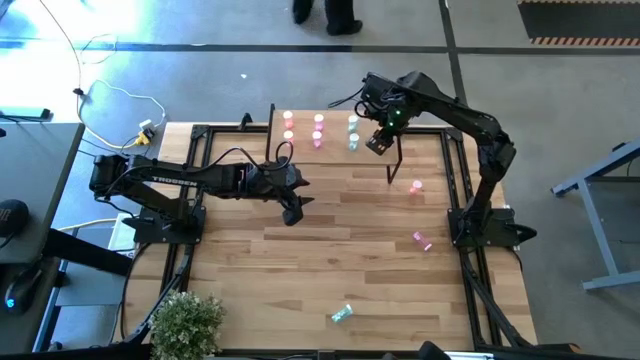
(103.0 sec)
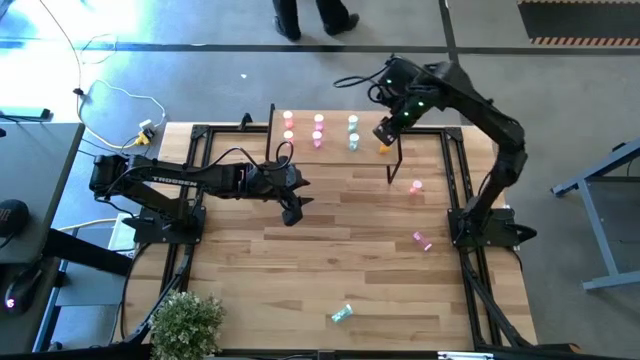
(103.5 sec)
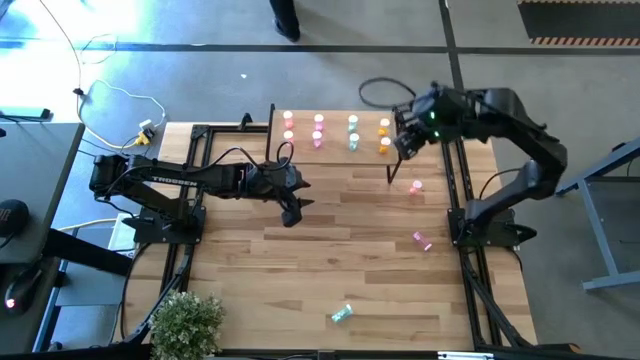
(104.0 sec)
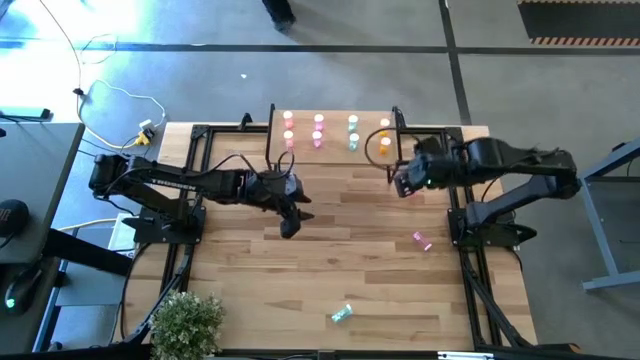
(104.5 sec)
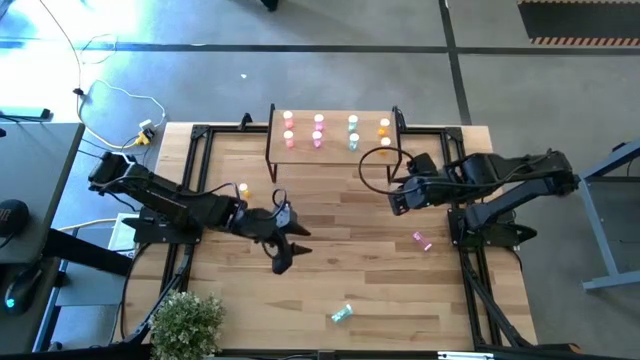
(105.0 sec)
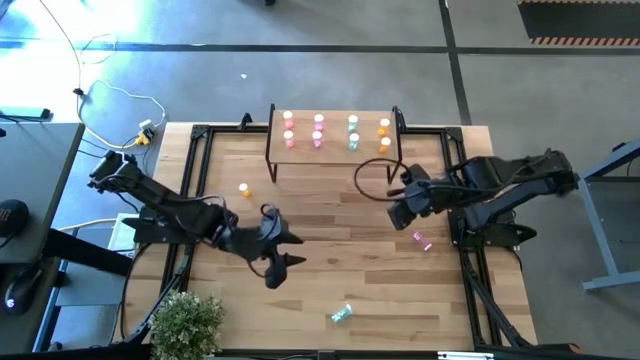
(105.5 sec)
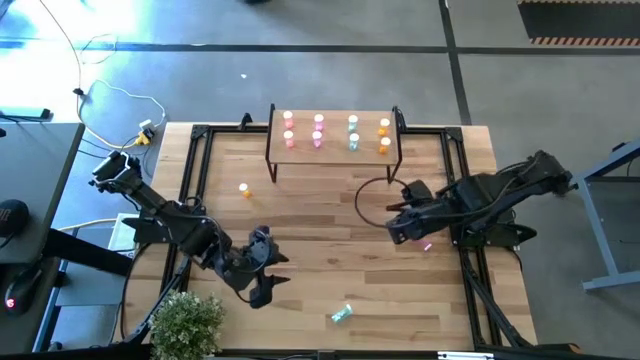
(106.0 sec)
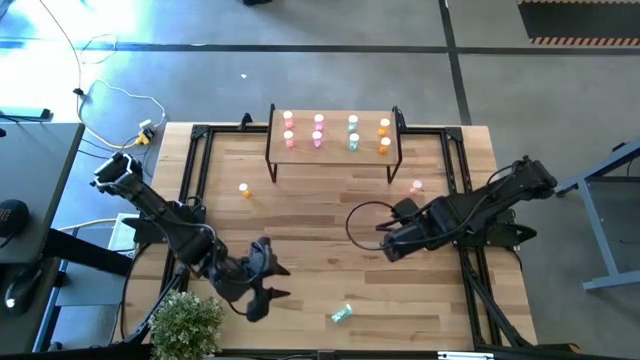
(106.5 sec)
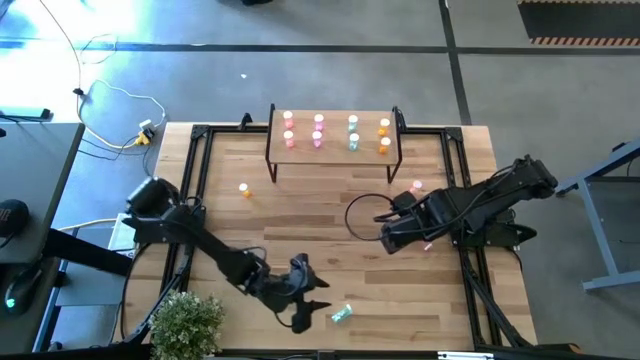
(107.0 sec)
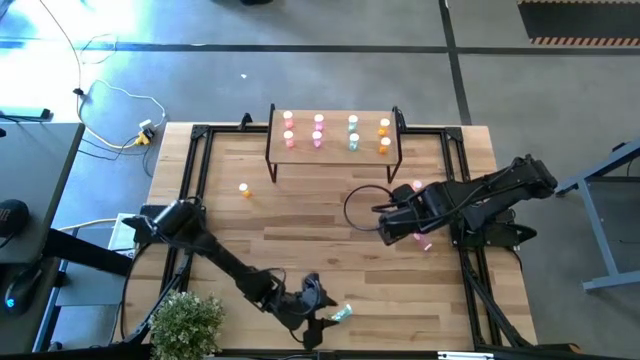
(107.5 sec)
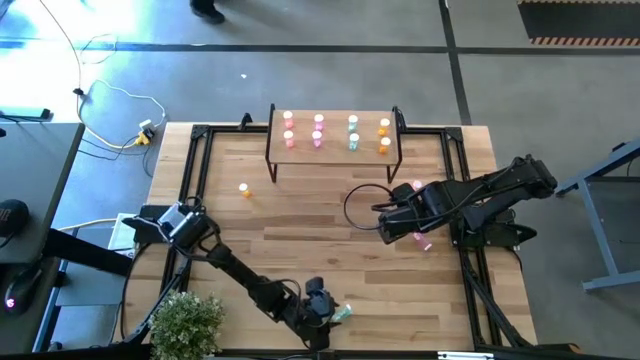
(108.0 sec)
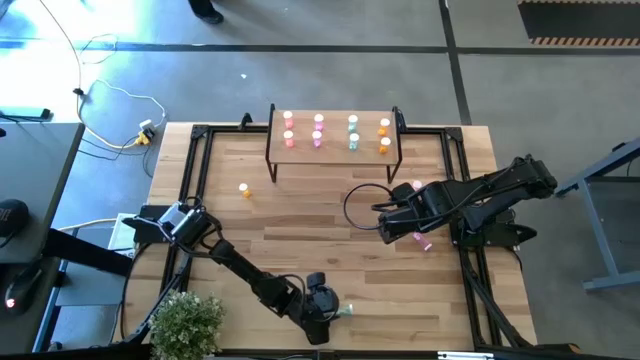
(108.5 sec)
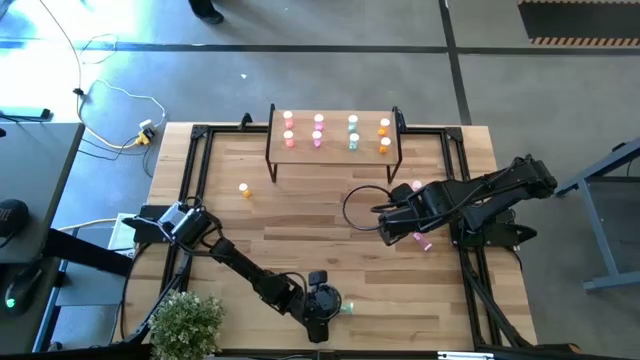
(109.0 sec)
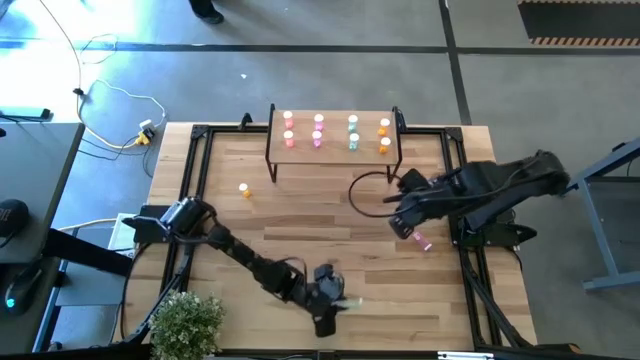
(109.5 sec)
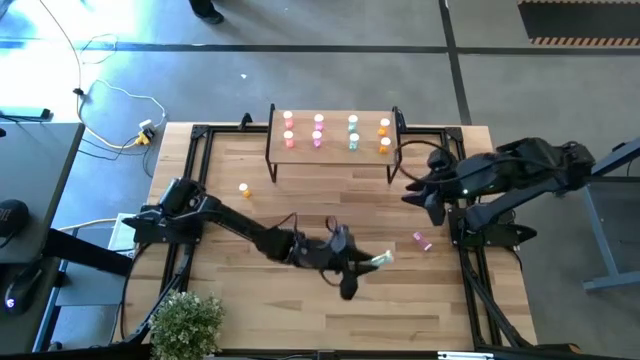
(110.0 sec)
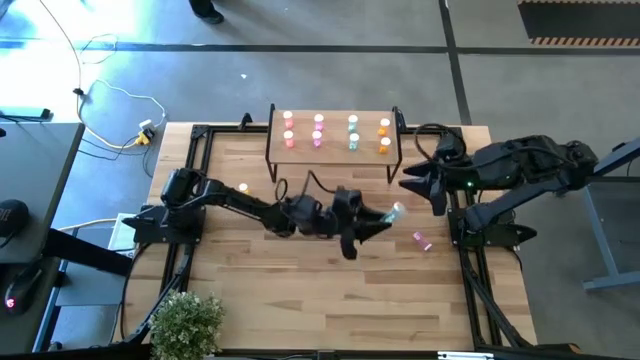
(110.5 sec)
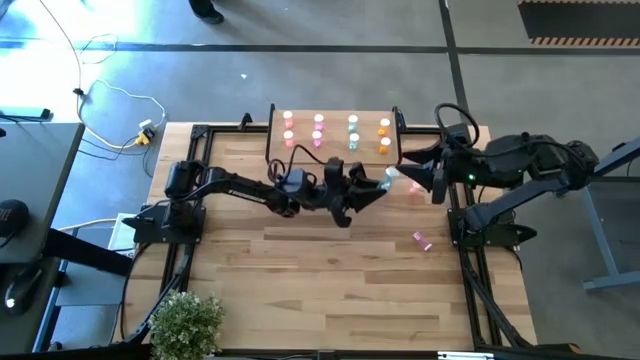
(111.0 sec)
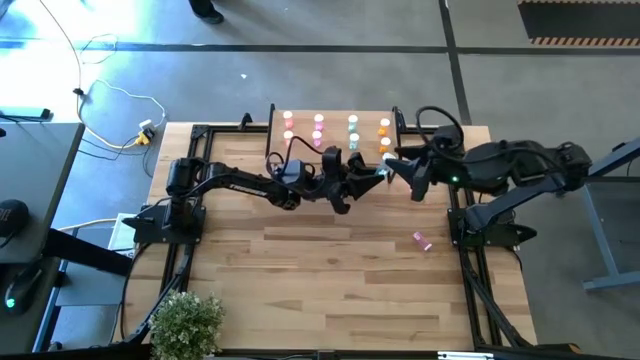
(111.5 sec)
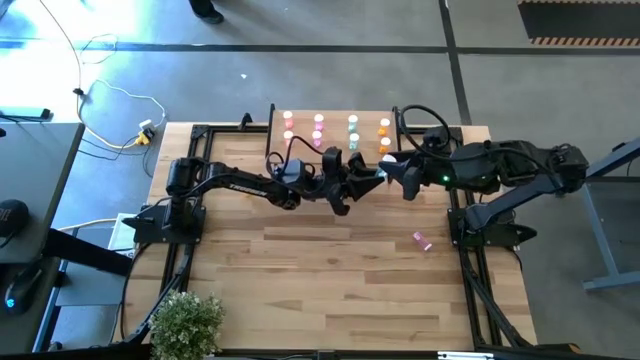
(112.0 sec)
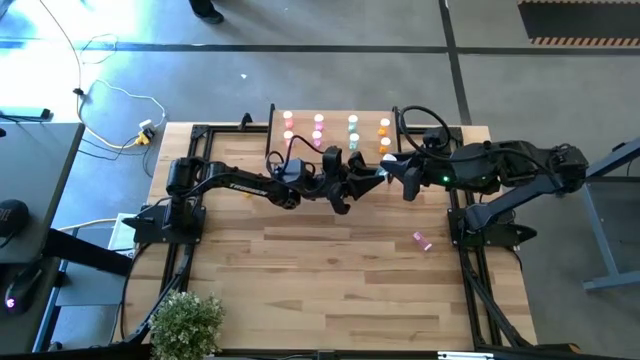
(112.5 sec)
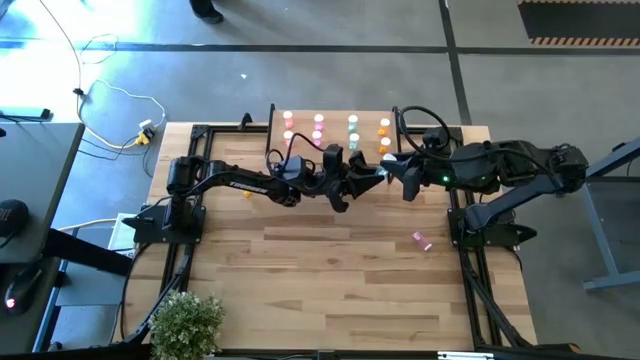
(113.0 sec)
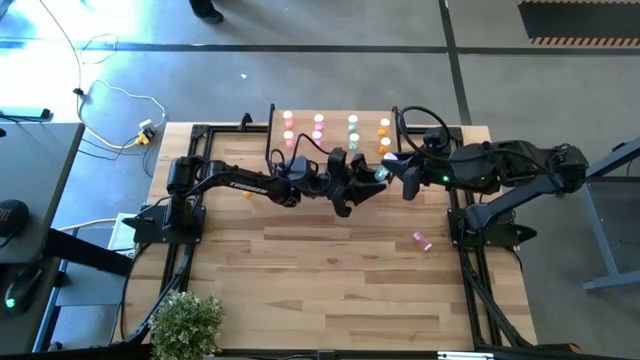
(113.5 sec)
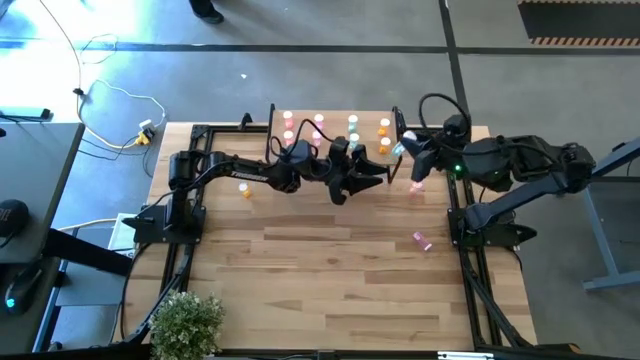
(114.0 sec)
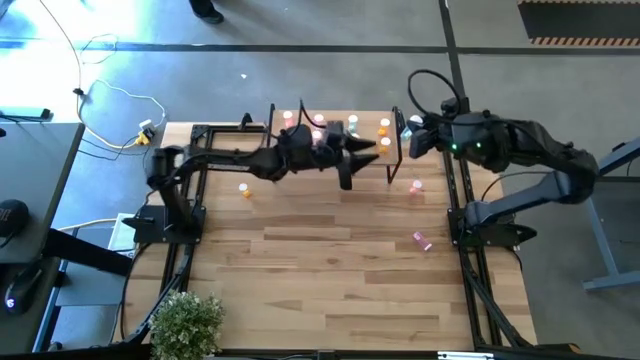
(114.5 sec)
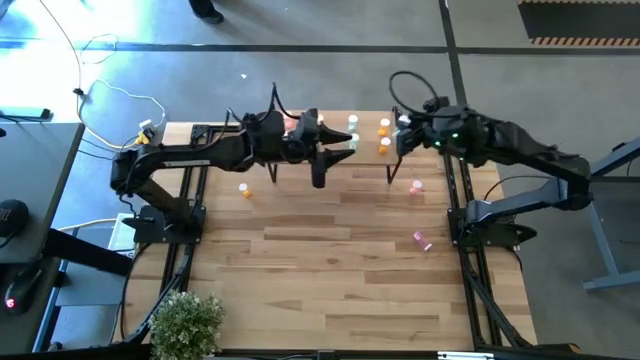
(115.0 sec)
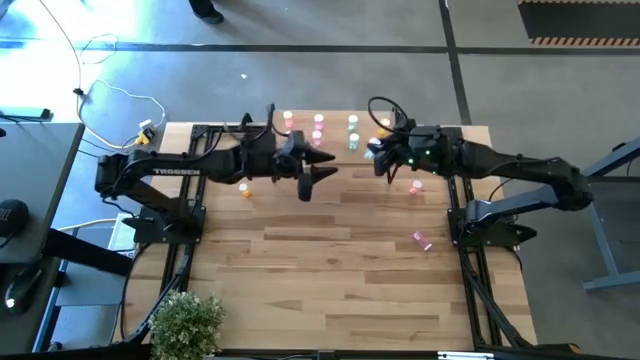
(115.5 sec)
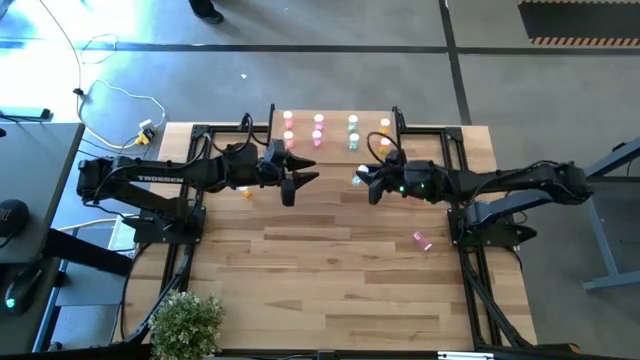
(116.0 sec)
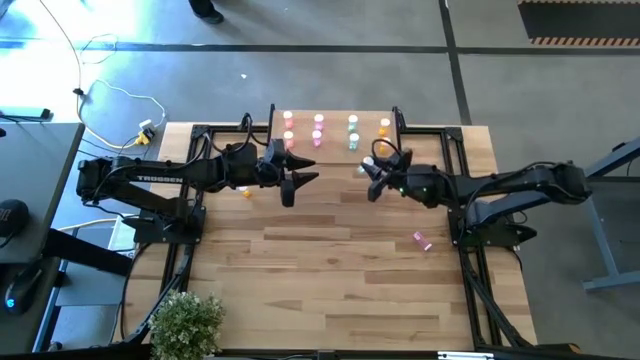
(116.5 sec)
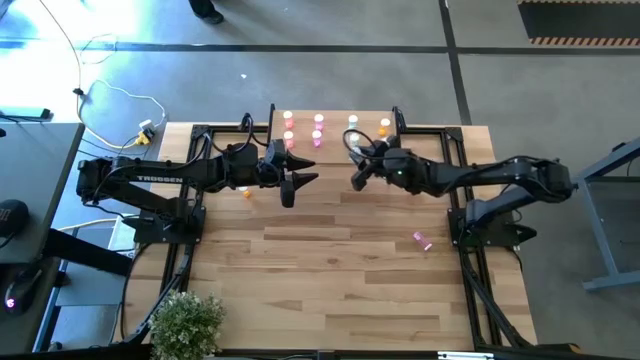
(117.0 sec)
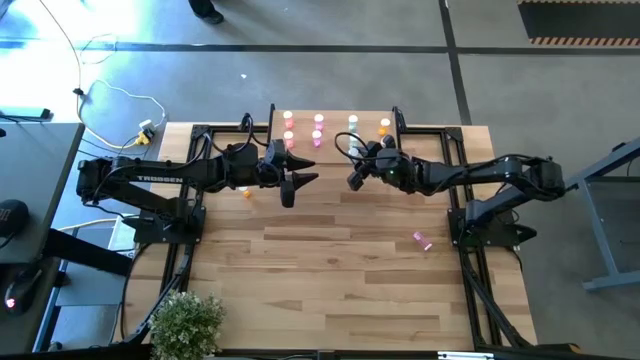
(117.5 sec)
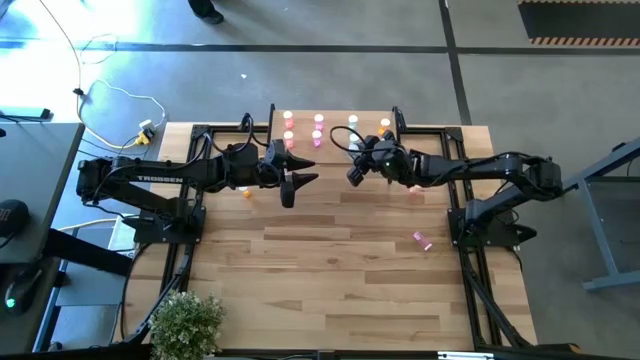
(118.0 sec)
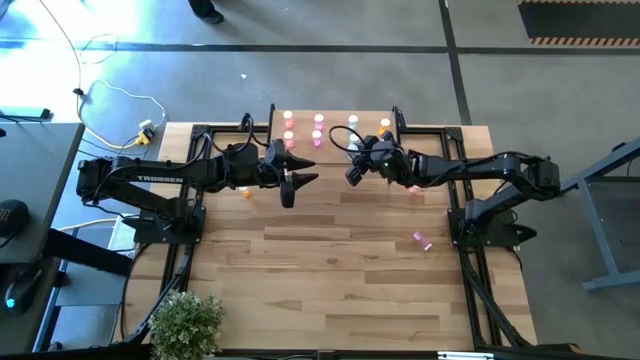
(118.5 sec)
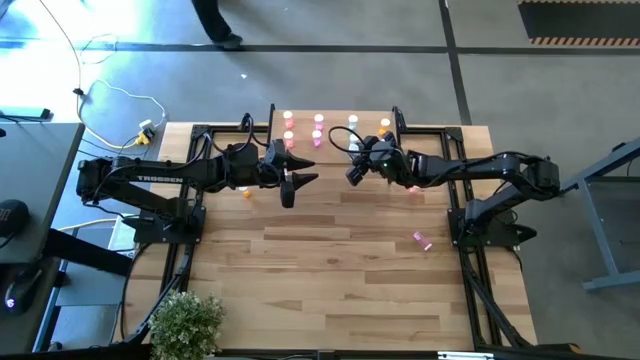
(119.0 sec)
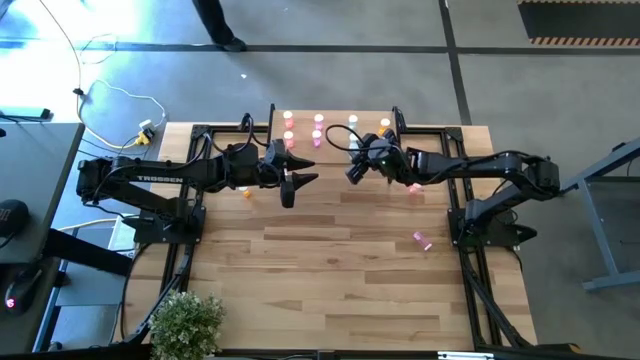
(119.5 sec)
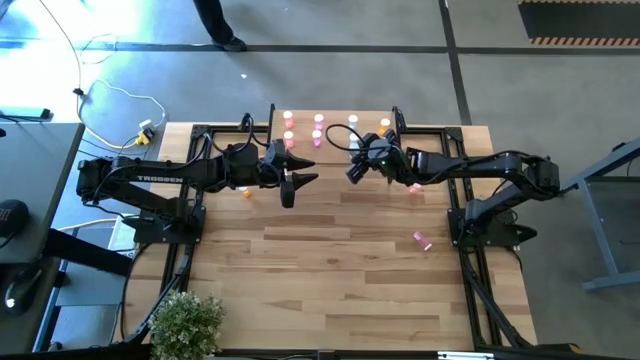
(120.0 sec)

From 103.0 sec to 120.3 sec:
Task: Pick and place medicine bottles onto shelf by color
Put the blue pill bottle aligned with the other blue pill bottles on the shelf

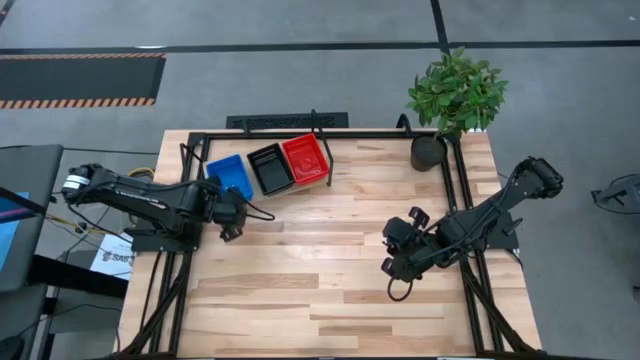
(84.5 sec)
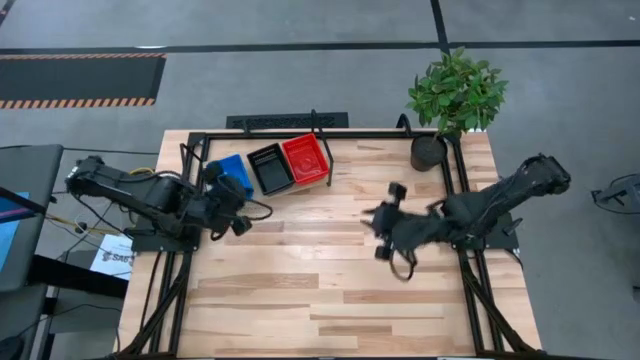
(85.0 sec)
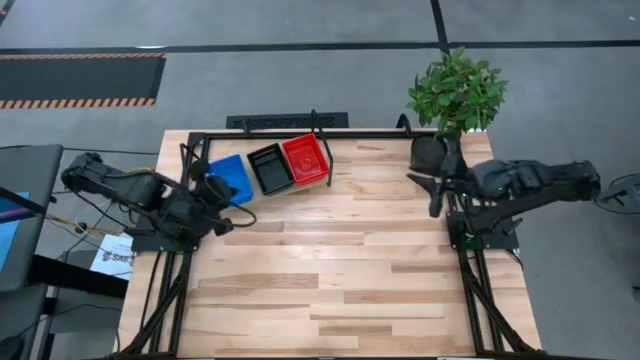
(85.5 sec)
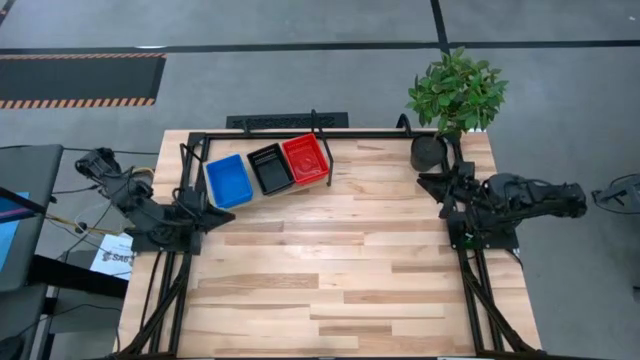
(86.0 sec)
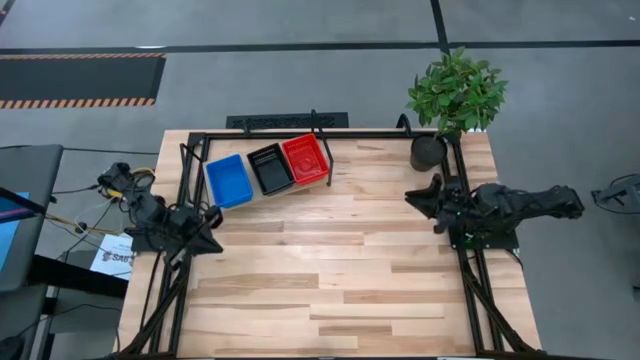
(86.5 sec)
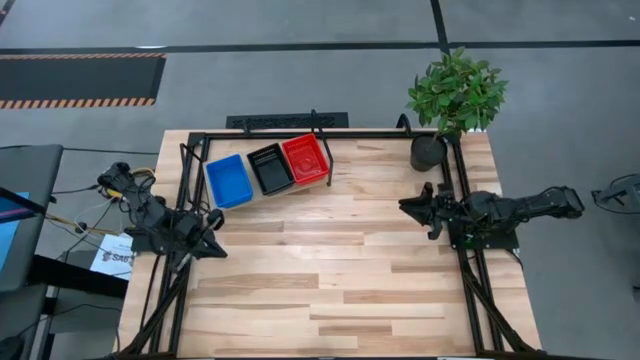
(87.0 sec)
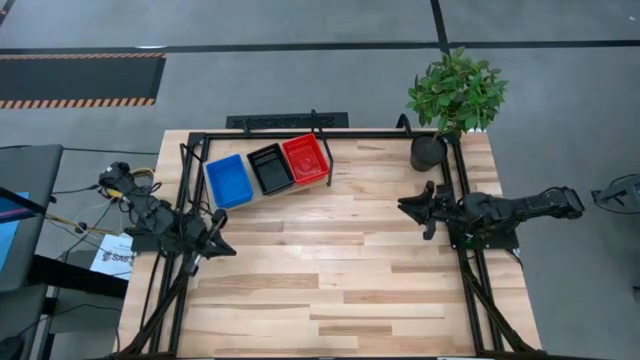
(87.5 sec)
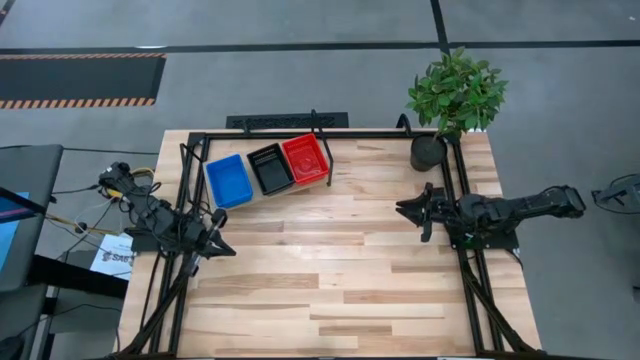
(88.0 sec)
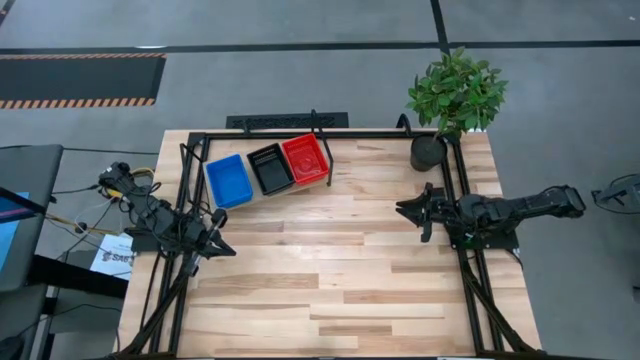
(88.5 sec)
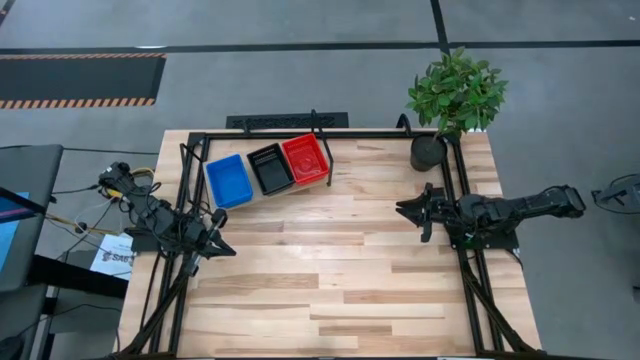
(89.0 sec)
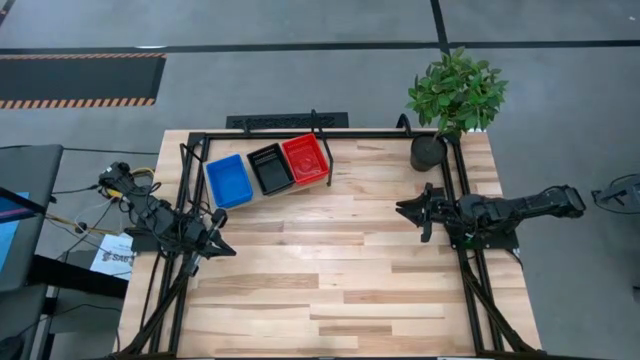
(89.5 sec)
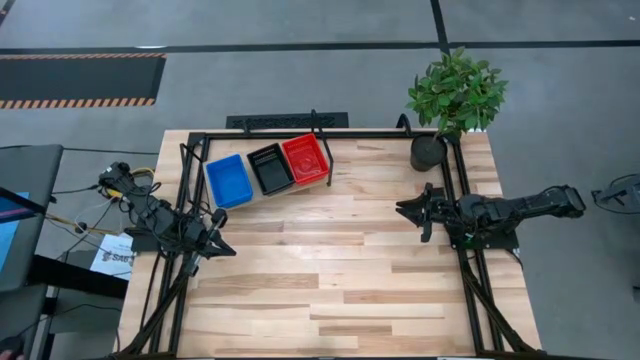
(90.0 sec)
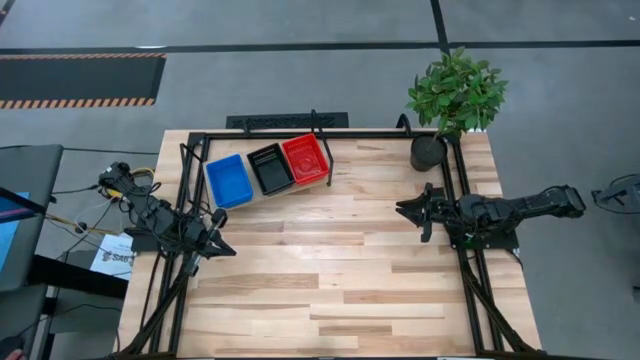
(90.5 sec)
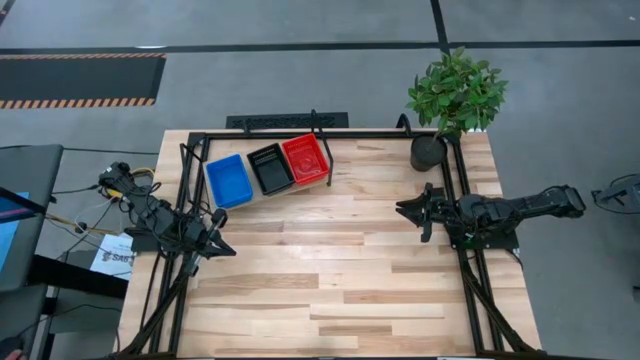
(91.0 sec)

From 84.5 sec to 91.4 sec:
Task: Stack baskets on shelf by color
Return to Home Position
